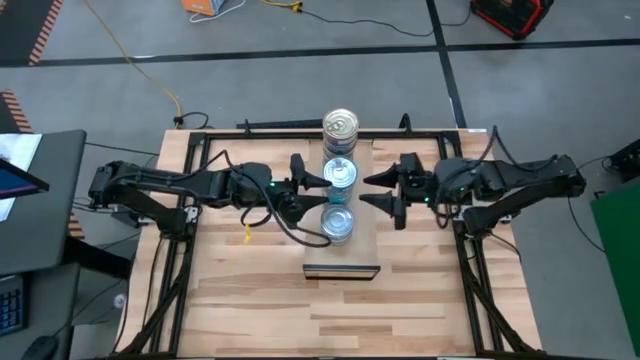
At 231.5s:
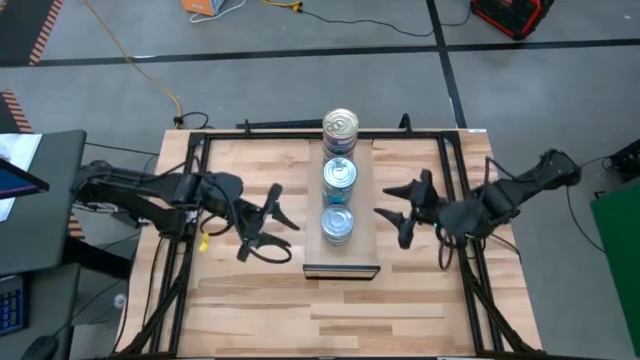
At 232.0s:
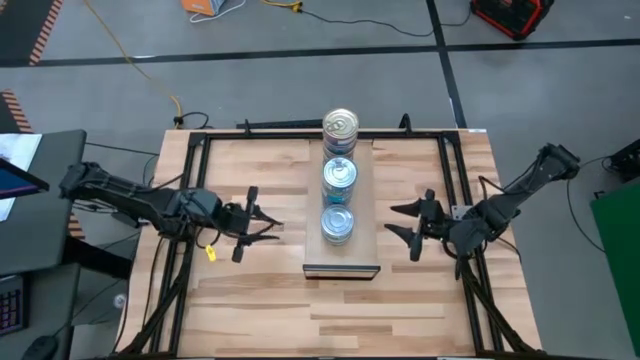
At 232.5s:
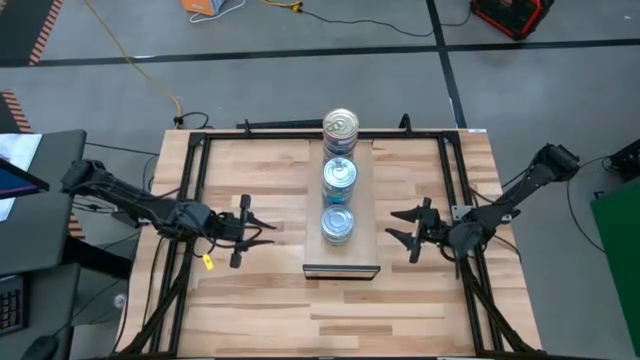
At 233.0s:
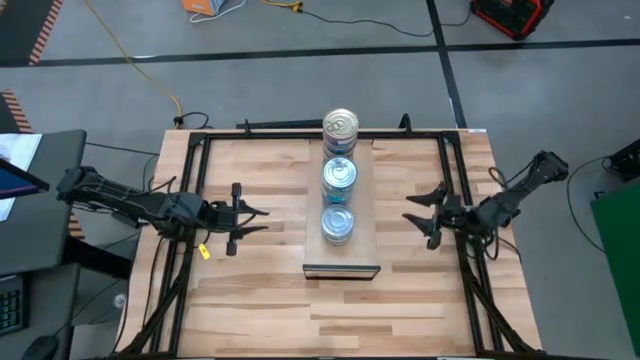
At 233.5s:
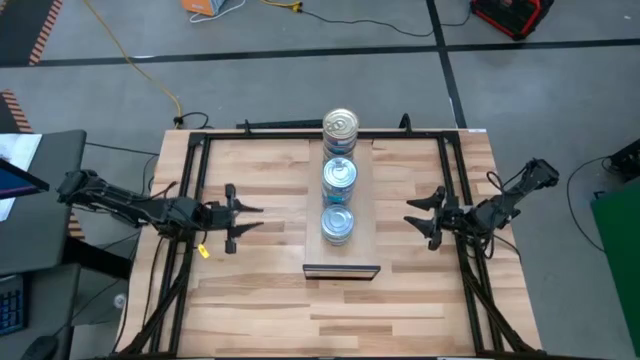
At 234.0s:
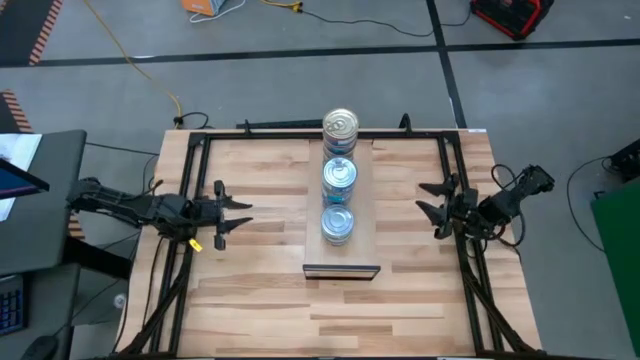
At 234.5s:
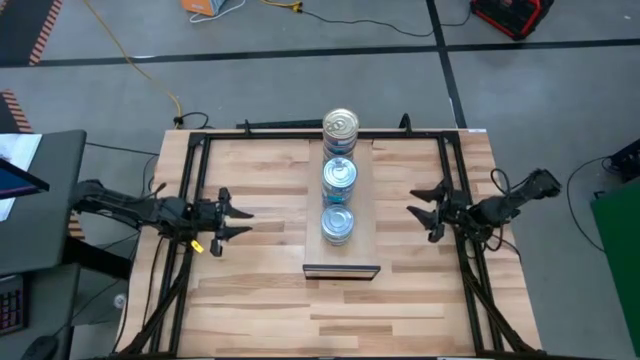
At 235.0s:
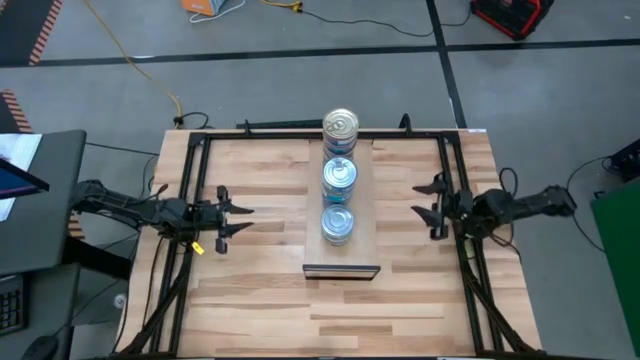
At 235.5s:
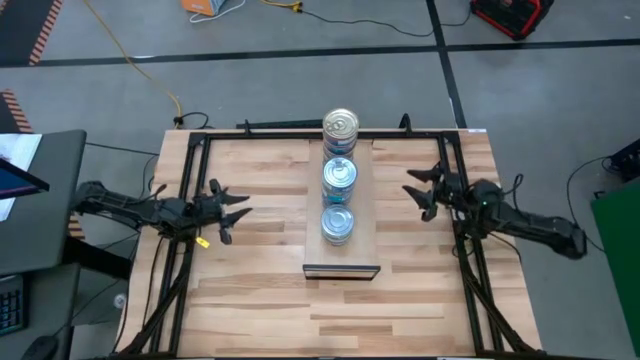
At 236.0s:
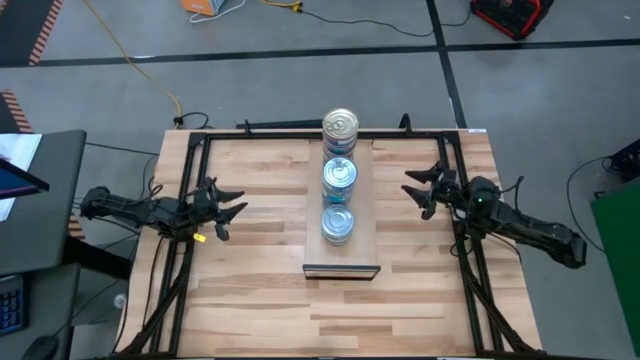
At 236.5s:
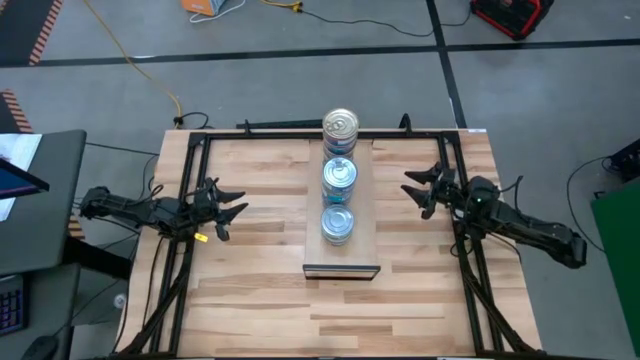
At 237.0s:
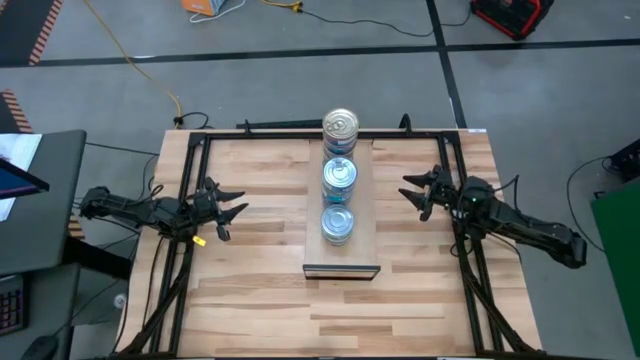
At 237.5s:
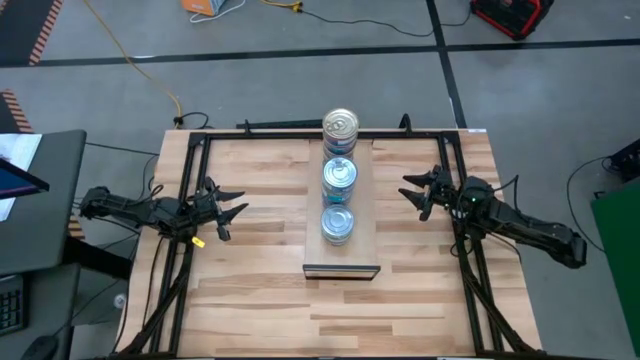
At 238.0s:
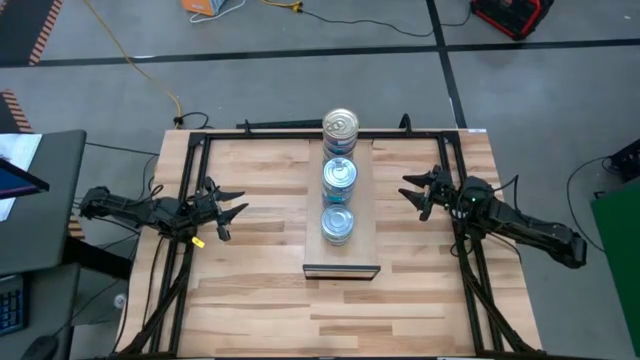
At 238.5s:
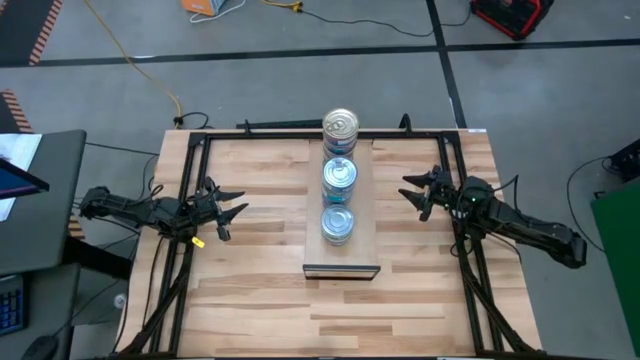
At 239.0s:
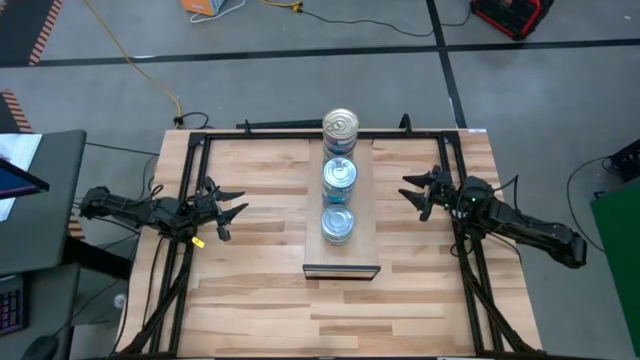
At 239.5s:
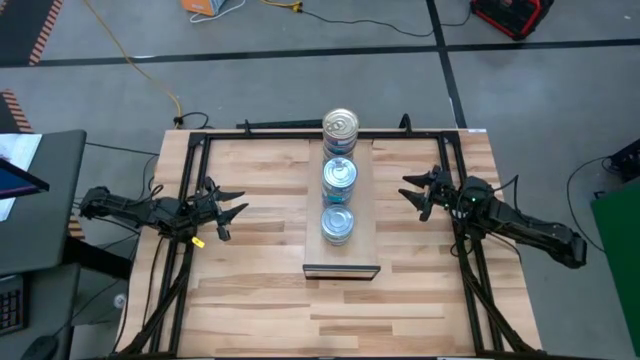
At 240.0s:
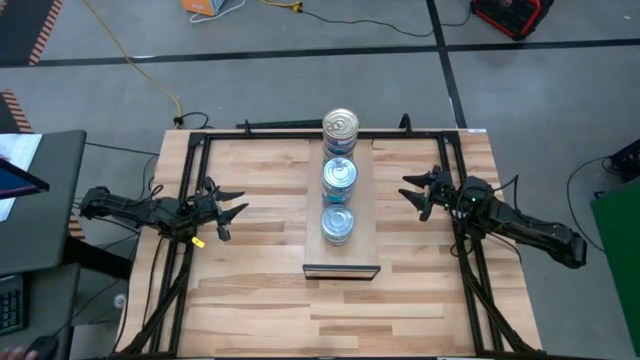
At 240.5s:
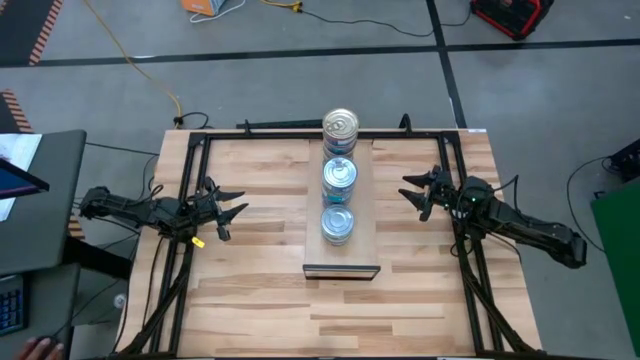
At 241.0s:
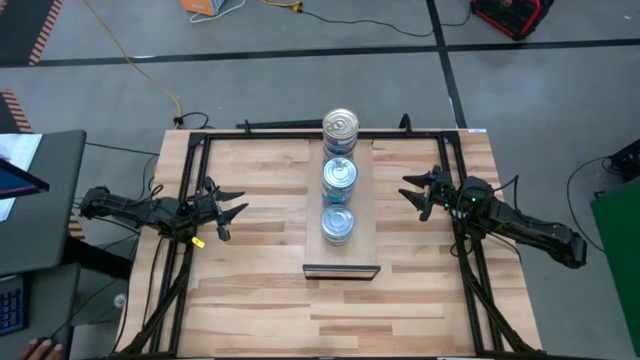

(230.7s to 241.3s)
Task: Stack canned seafood by type on shelf
Return to Home Position

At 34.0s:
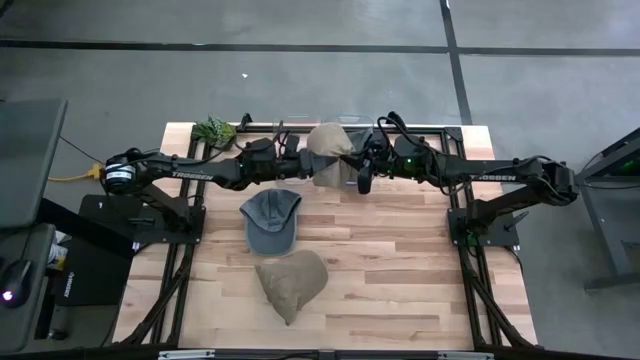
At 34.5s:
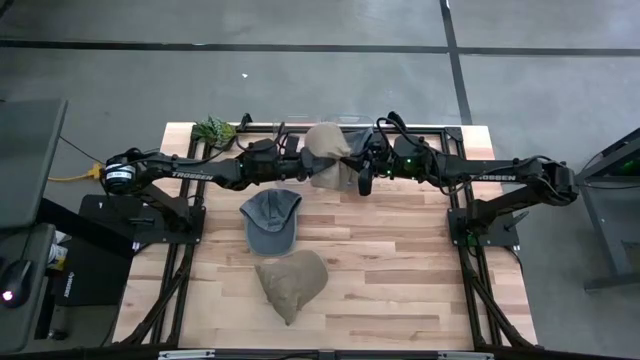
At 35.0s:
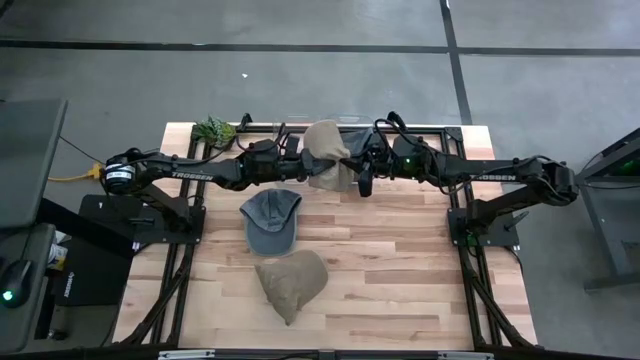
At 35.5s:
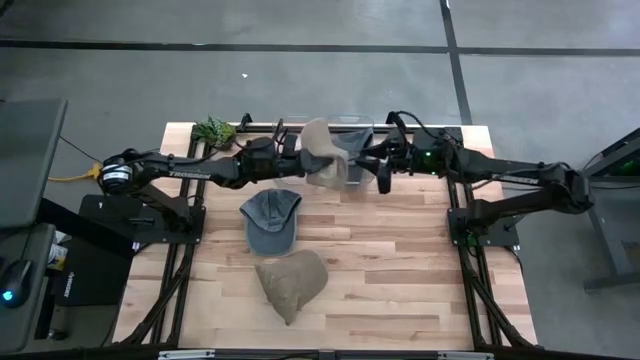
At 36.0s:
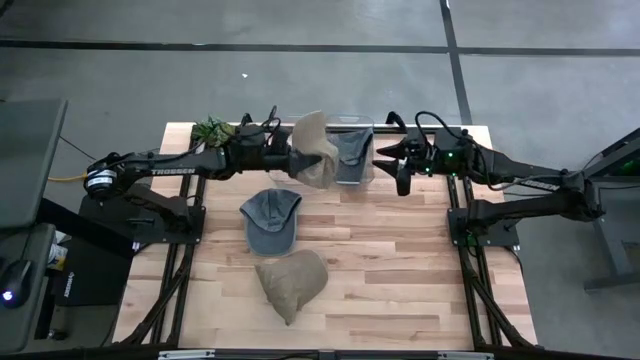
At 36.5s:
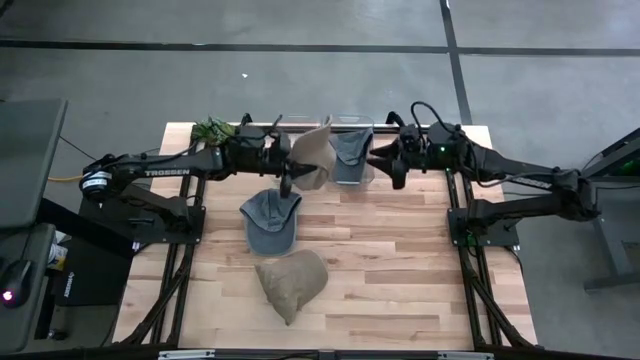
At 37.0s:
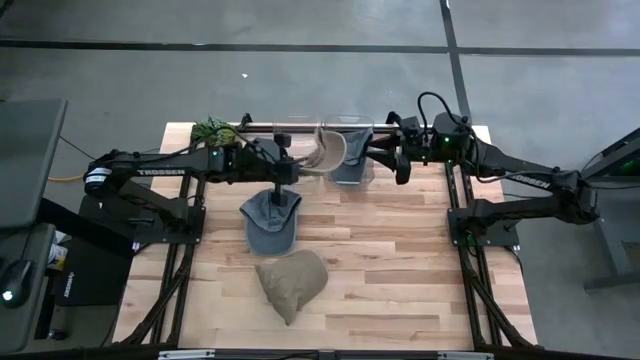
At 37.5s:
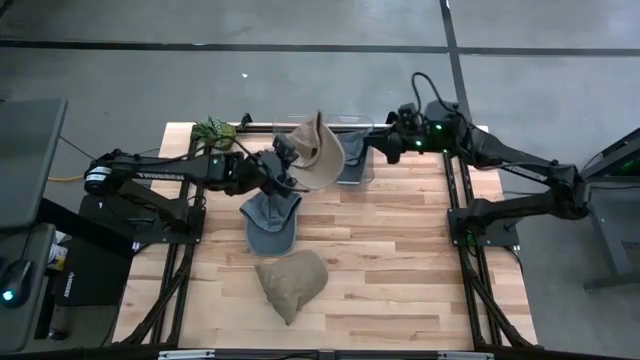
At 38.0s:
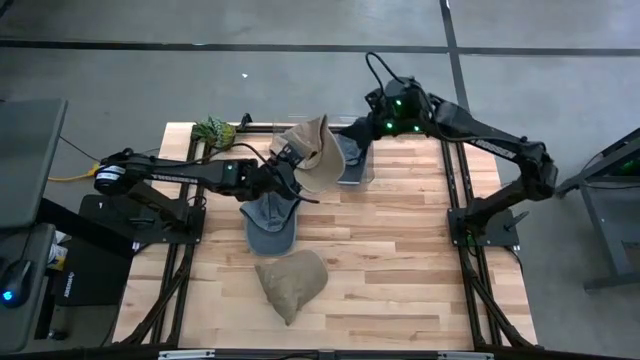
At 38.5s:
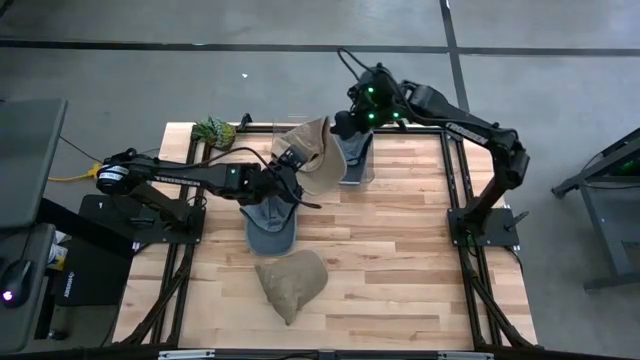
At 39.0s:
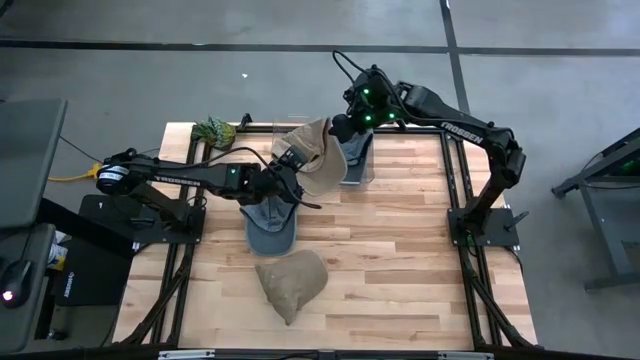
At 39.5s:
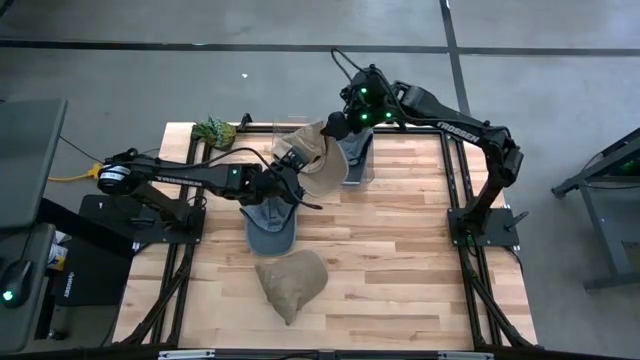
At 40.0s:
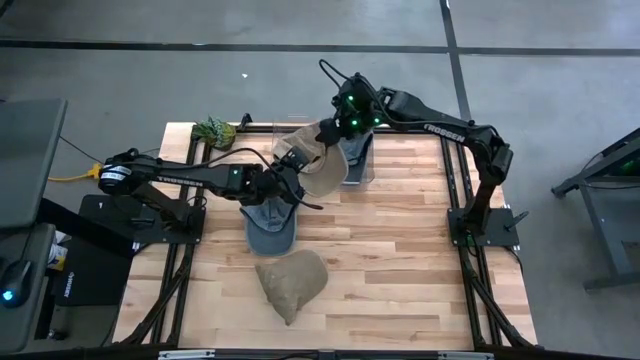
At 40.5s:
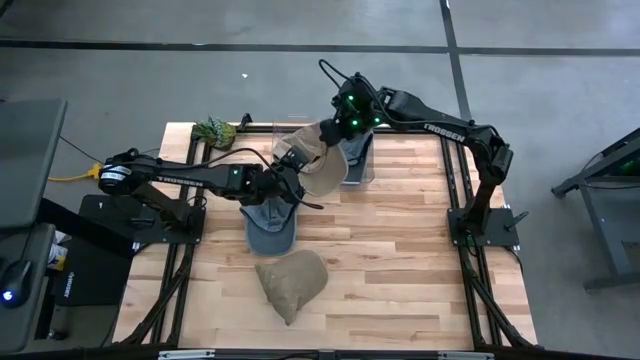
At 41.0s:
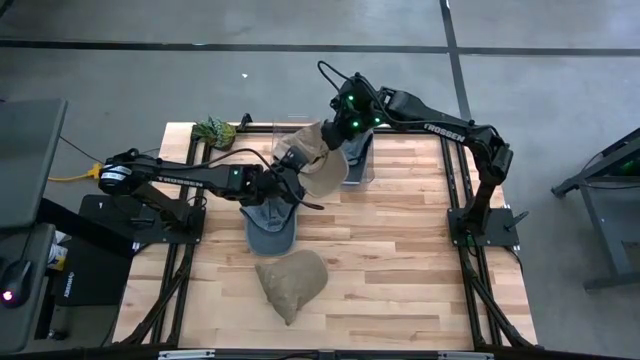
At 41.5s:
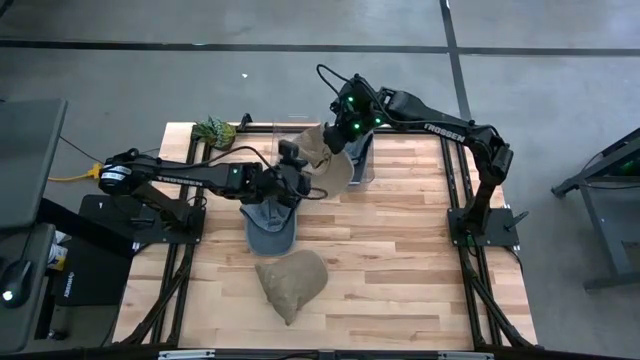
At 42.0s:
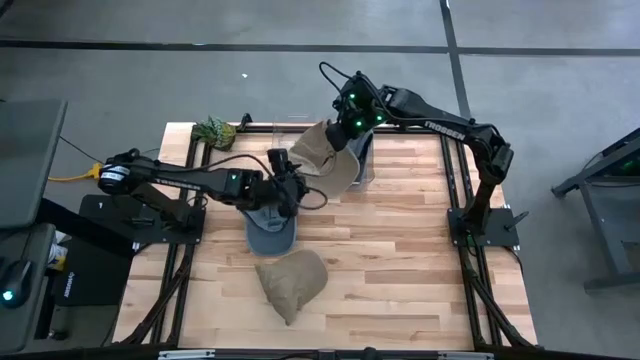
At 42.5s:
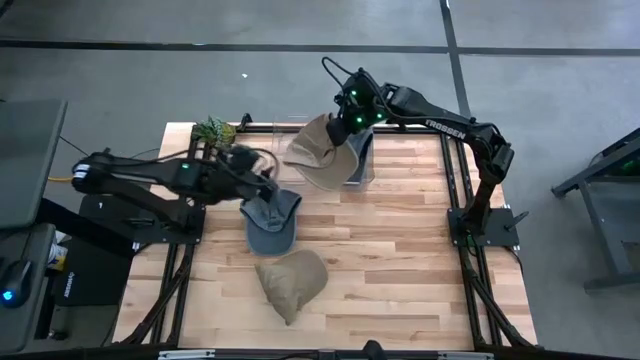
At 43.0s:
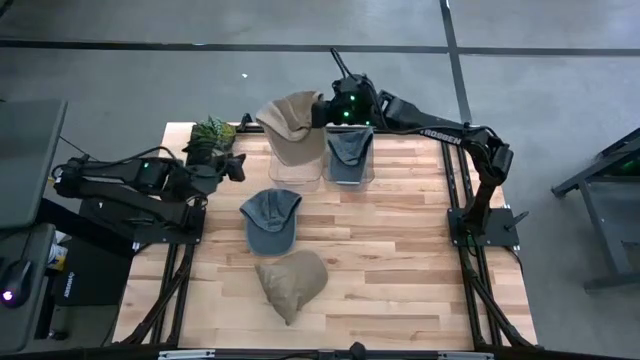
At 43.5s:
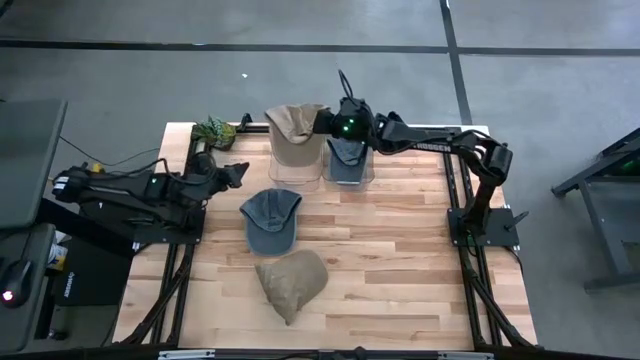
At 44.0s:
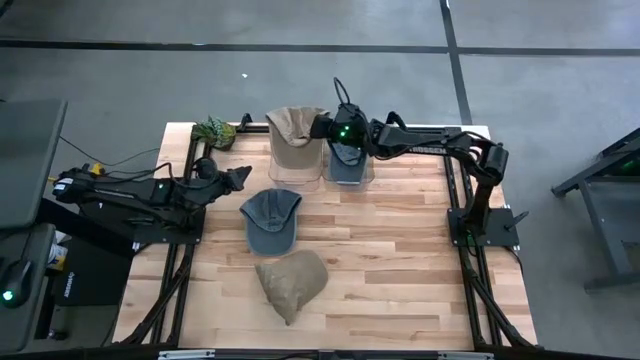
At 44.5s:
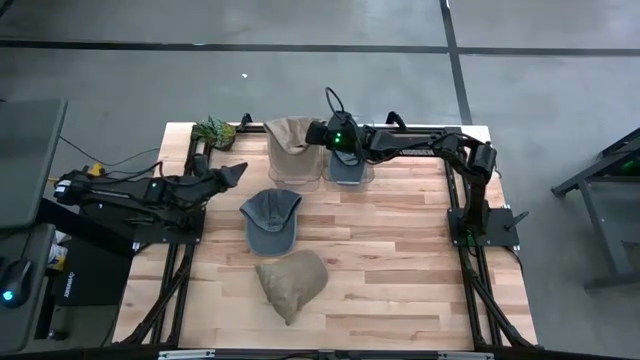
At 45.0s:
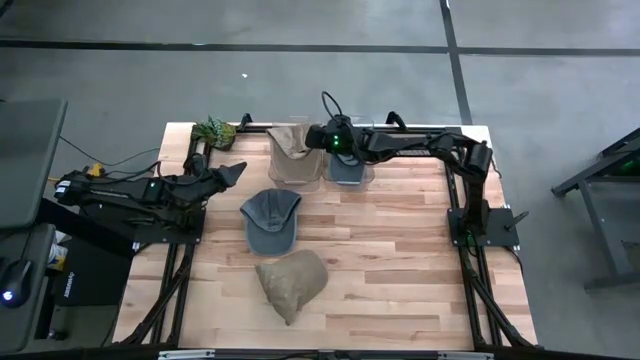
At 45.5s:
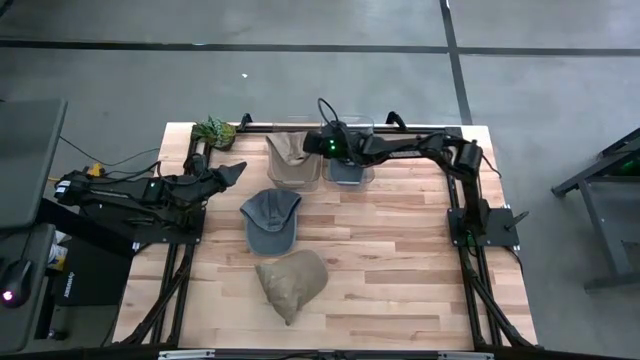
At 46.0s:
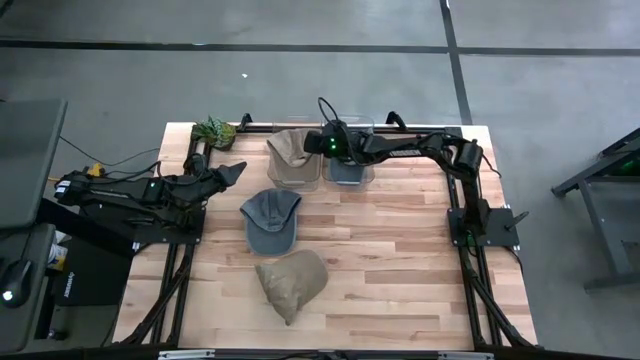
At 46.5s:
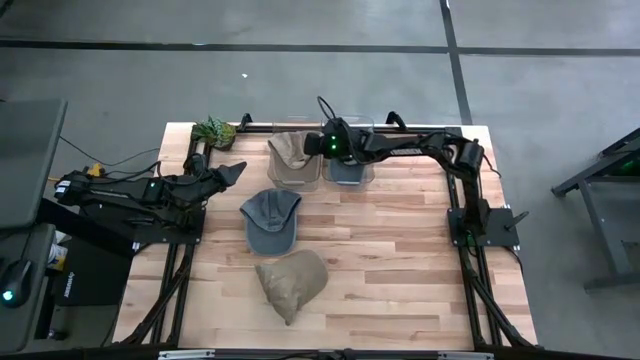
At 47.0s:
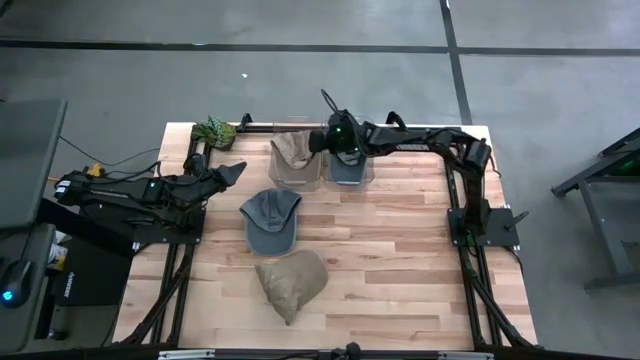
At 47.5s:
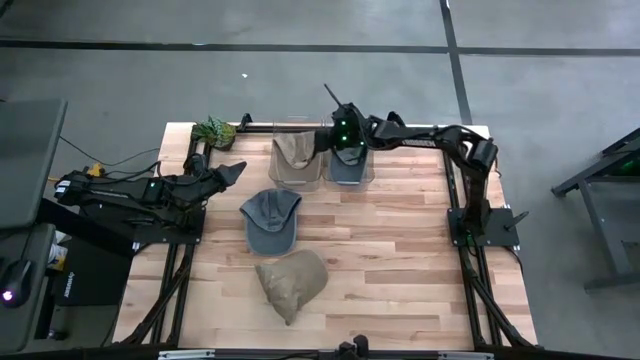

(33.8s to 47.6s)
Task: Pick & Place hat
Put the top brown cap into the left transparent bin
